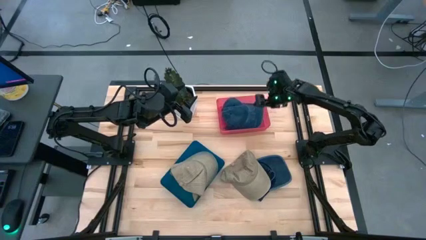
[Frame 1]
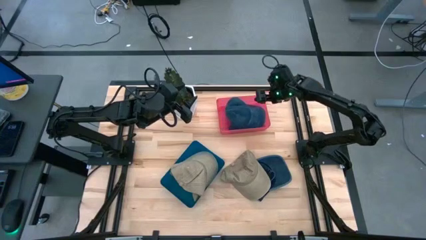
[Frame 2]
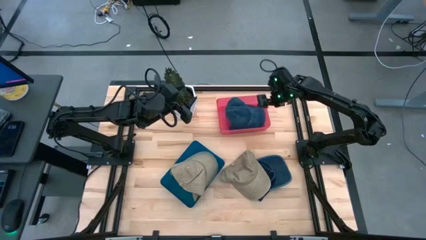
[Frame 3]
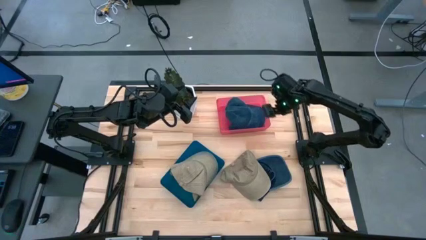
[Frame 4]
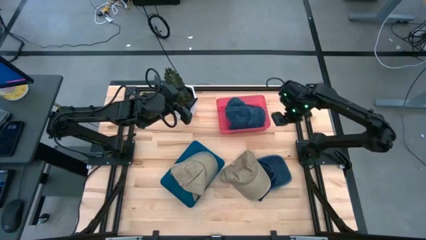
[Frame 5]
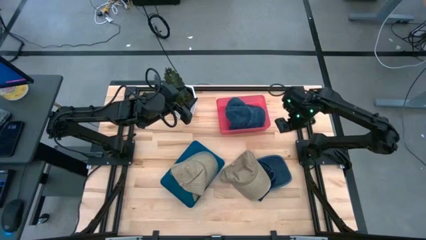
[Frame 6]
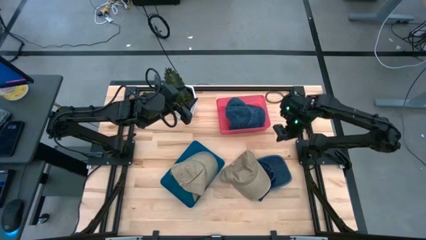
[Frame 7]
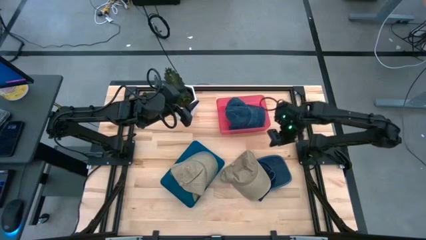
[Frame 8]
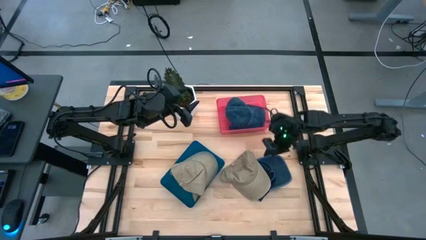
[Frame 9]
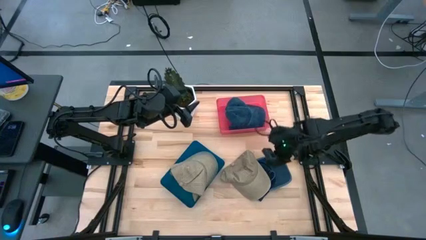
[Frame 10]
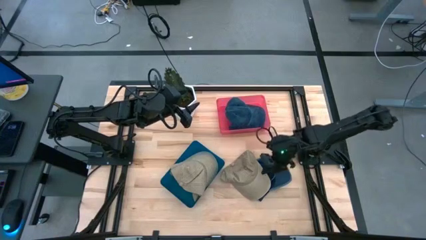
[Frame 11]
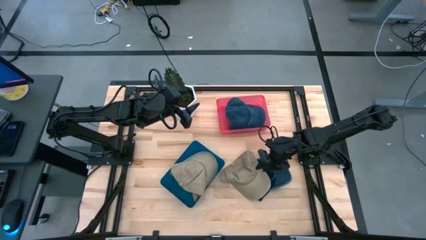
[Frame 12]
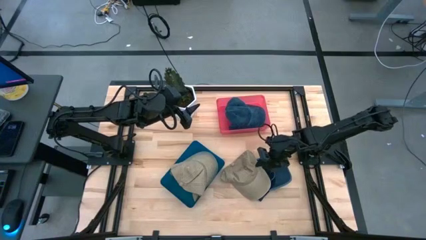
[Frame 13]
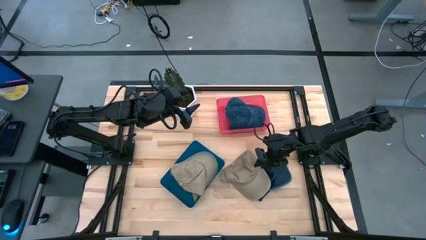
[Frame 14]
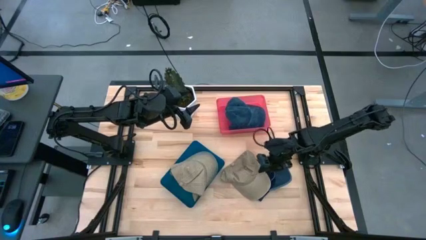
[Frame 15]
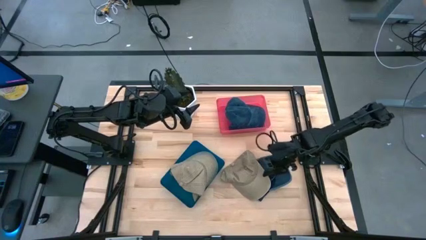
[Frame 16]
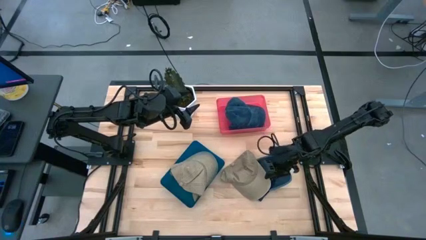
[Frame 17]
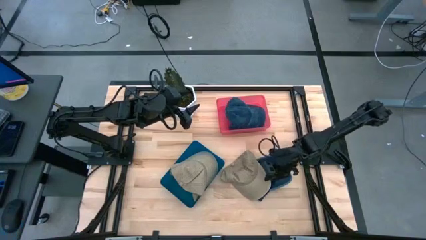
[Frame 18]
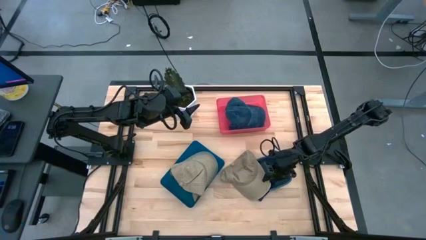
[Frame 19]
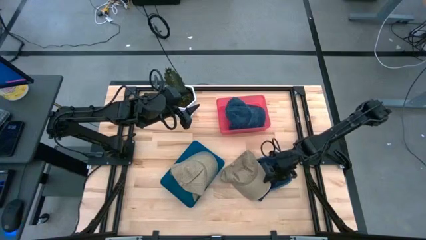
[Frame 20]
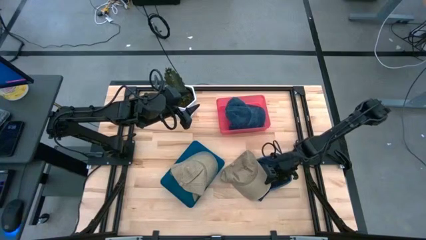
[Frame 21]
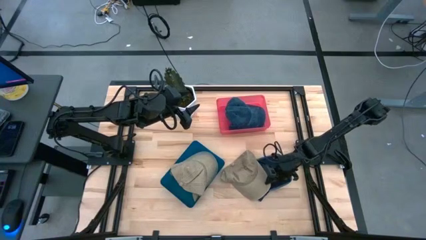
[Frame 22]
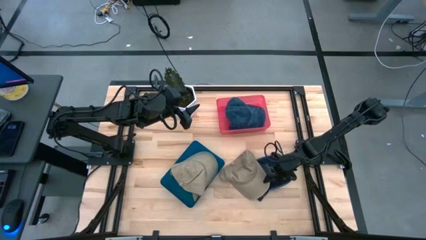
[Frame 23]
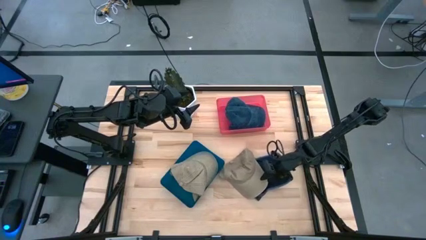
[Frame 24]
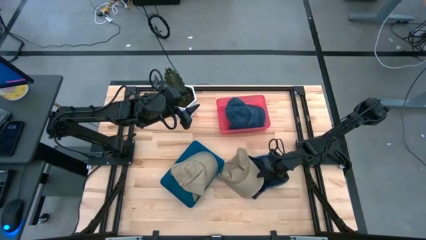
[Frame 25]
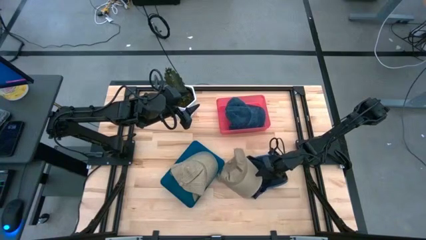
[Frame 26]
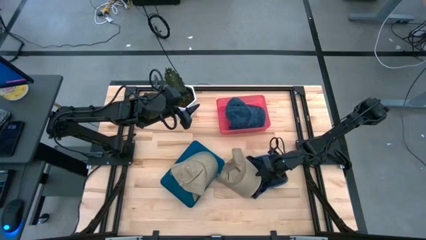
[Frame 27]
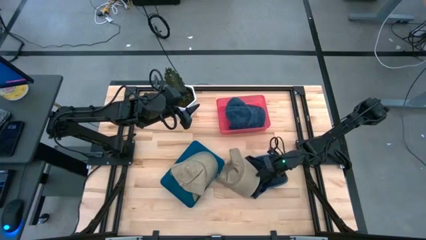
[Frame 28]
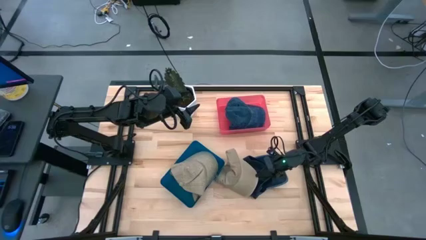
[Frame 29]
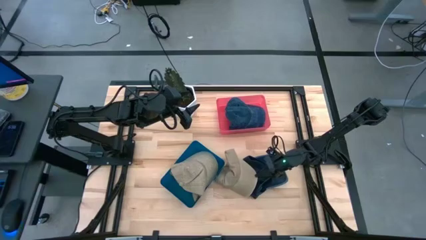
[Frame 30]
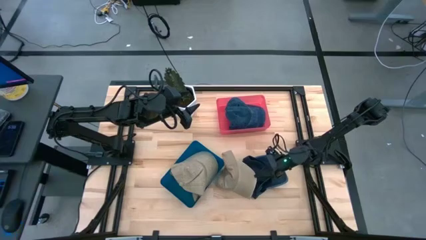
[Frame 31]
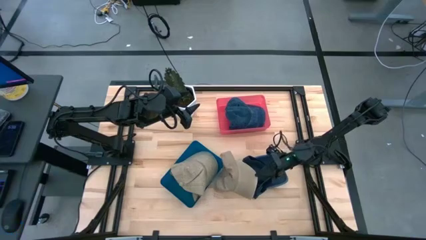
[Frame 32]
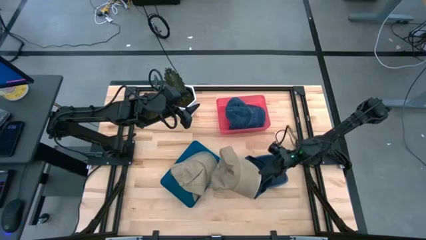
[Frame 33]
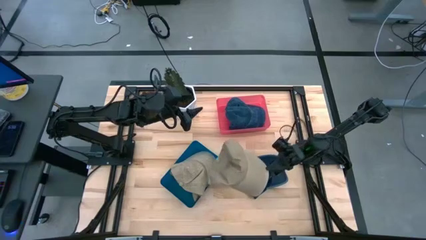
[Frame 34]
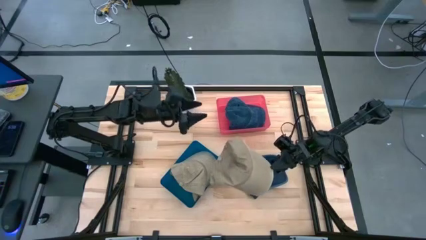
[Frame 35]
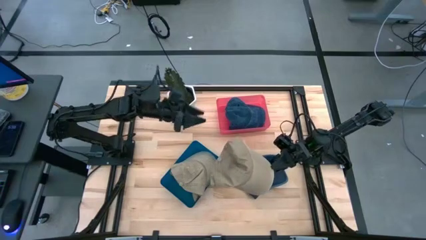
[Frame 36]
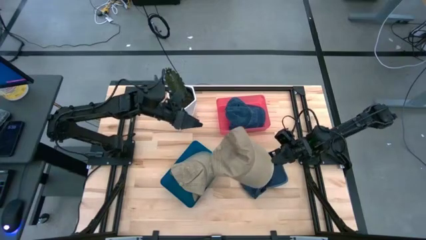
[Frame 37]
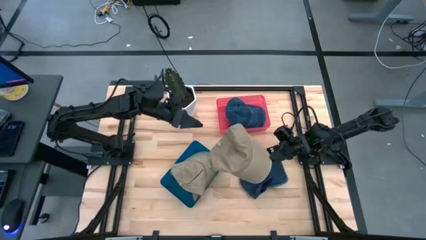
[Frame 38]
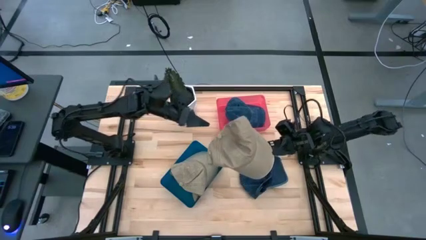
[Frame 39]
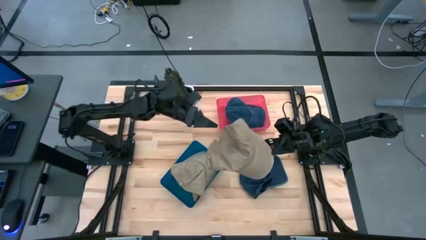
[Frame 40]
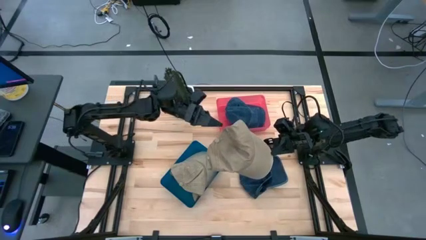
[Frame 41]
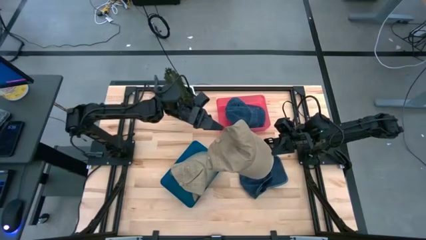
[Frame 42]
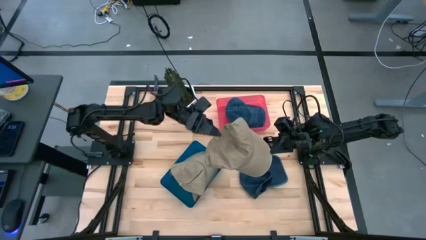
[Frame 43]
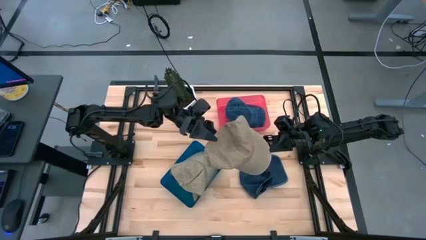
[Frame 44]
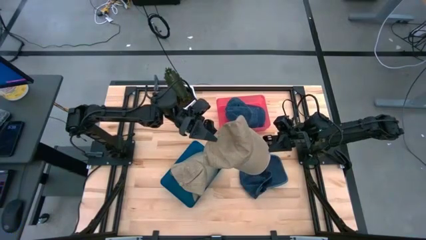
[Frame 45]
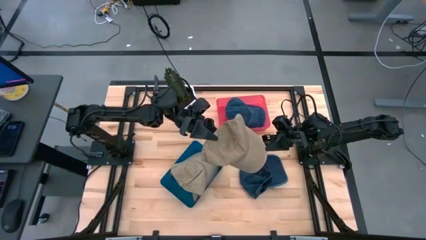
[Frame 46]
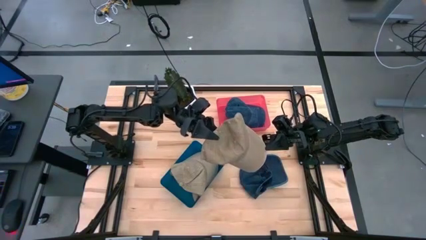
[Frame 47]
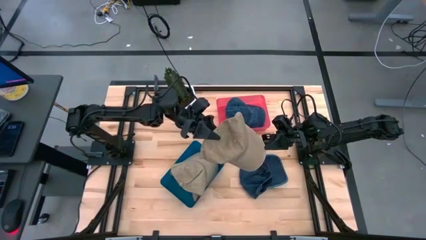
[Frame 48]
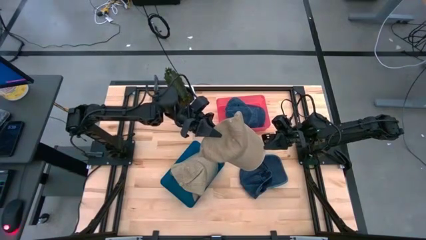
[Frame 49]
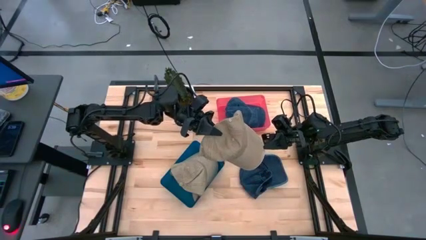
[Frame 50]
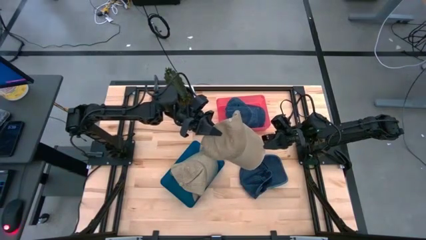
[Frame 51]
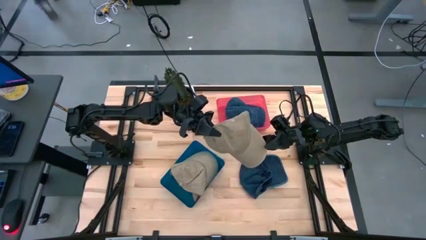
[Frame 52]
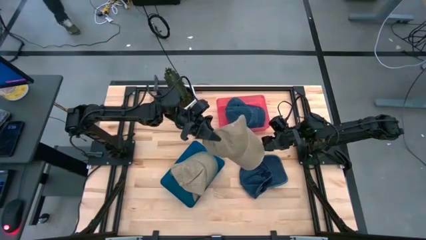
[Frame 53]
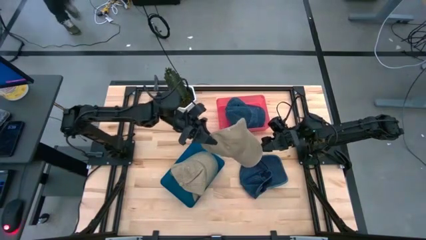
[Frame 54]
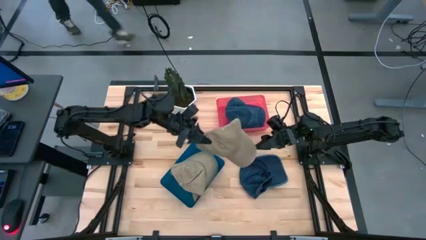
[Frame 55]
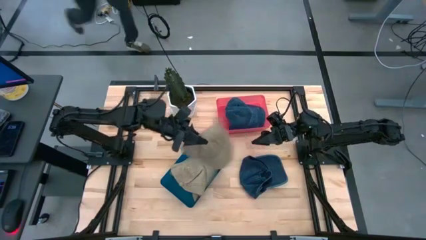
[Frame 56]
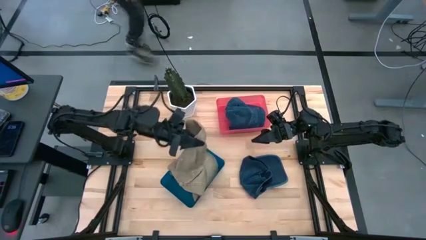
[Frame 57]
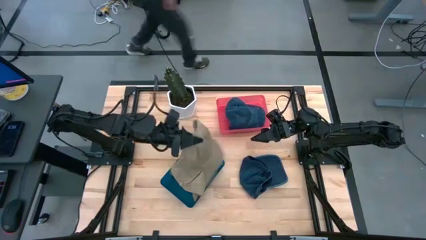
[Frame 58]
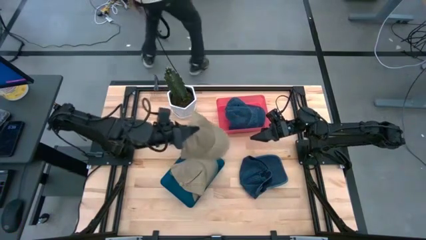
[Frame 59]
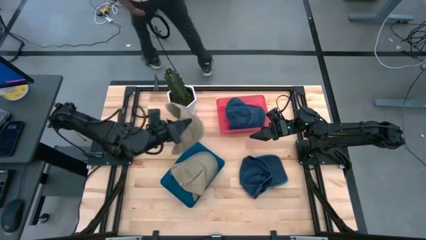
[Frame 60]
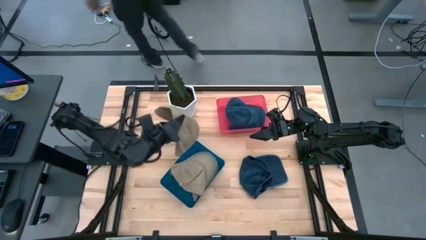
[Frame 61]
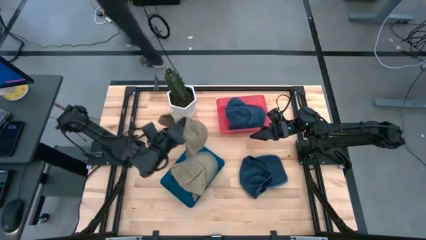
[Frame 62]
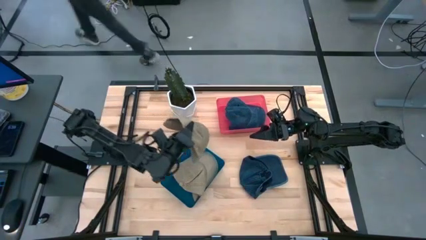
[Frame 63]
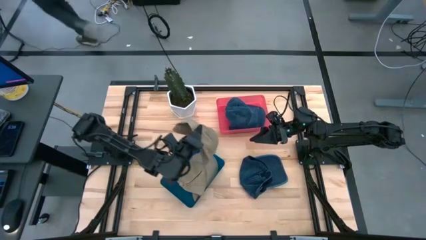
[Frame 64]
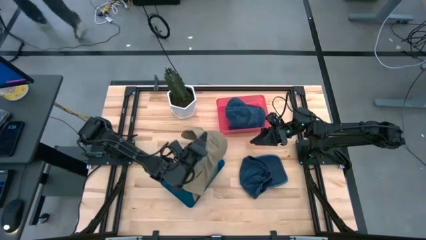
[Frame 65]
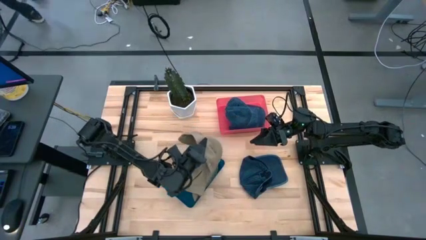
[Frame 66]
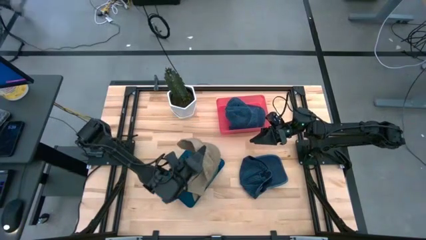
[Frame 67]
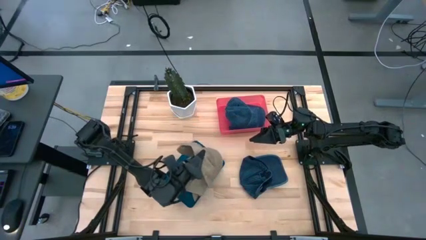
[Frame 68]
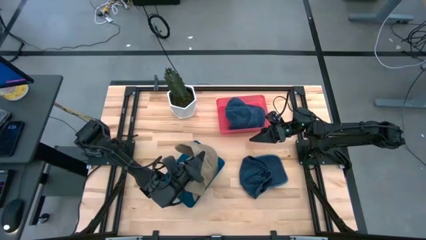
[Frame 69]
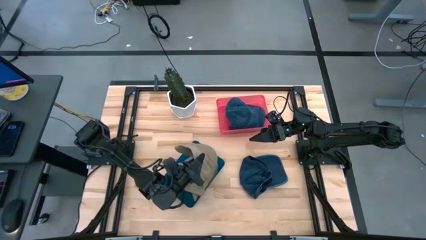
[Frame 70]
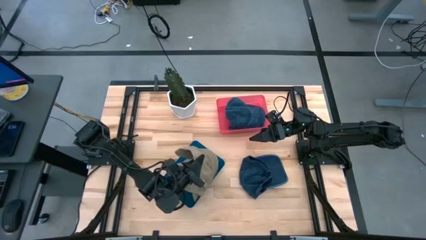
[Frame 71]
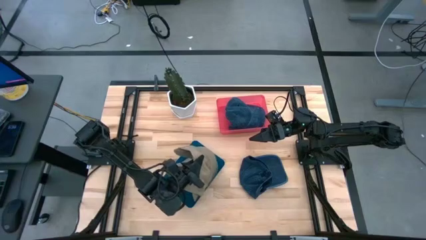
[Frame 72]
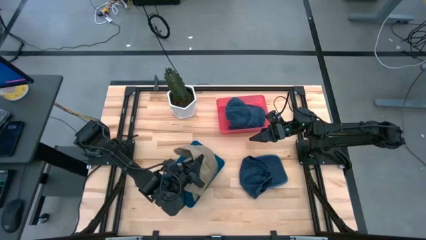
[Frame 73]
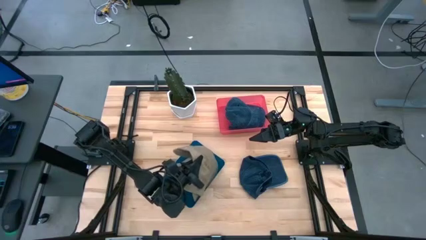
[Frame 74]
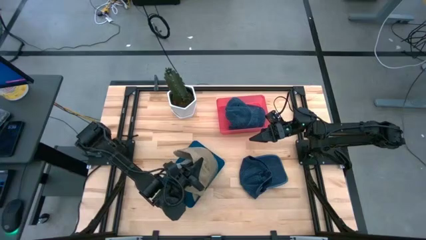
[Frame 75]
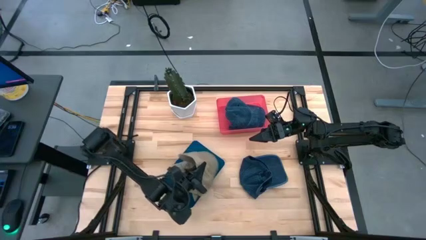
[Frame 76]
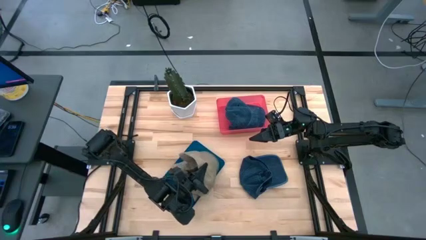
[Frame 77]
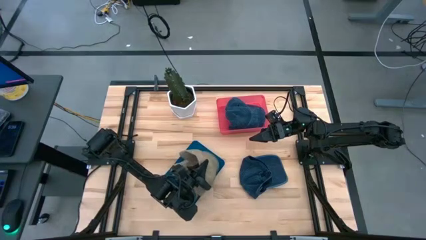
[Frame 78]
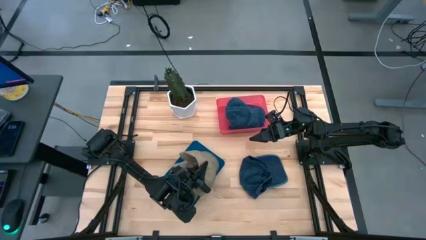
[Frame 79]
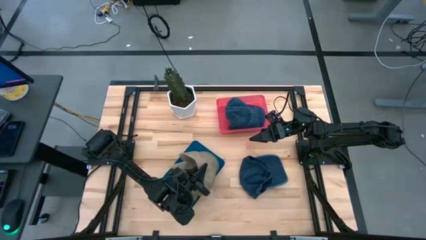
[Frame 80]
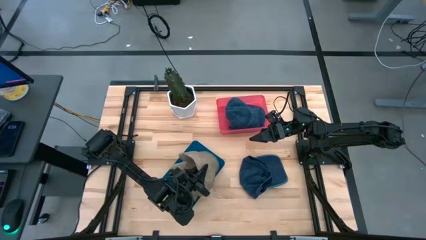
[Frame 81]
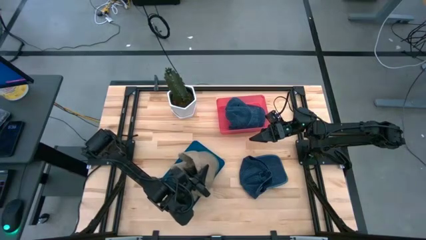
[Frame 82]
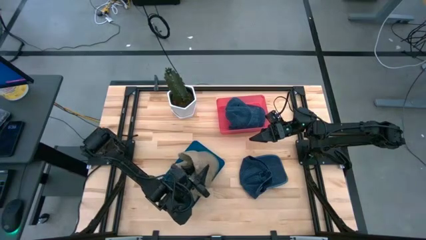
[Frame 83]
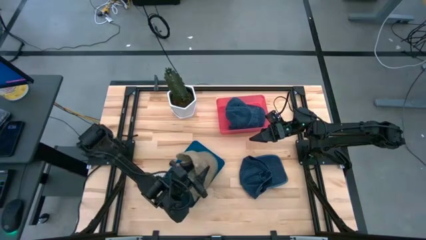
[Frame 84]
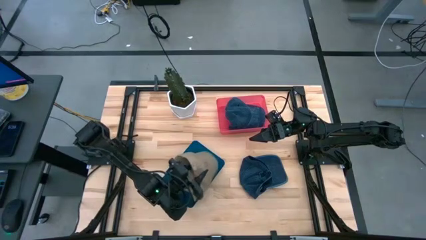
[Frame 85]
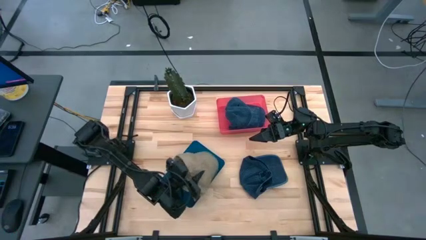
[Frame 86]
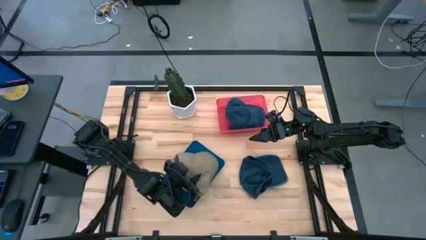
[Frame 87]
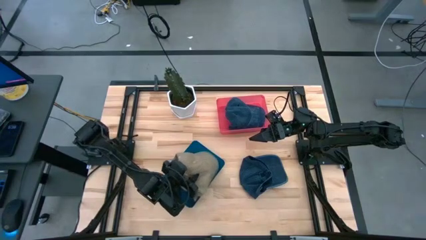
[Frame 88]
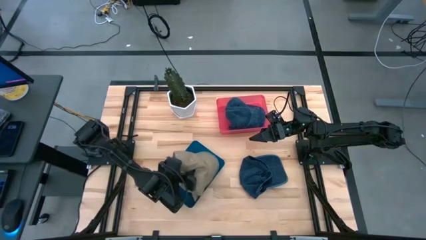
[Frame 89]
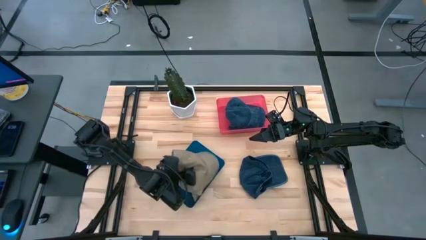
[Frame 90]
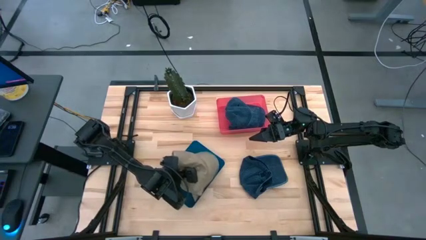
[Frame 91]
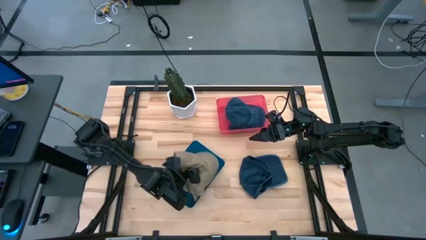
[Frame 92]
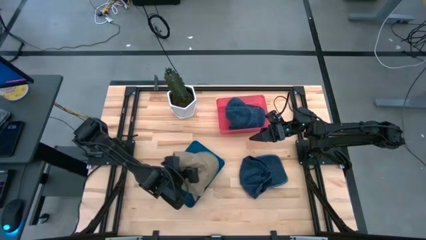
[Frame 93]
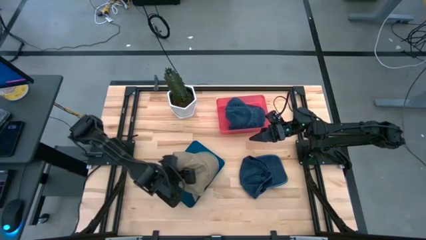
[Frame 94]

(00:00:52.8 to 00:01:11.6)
Task: Pick & Place hat
Put the brown cap into the blue bin
